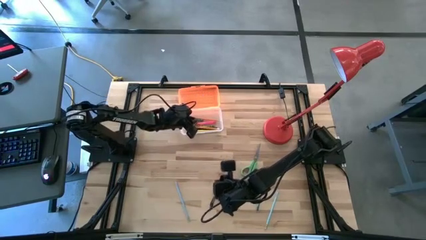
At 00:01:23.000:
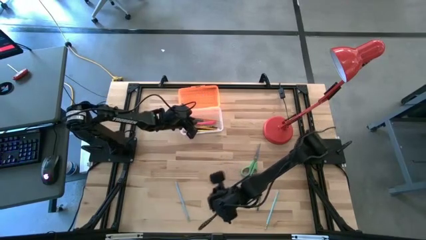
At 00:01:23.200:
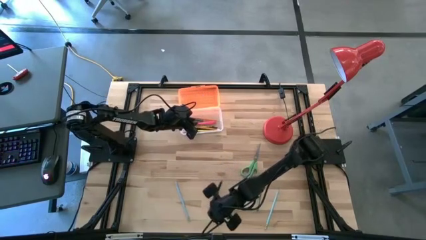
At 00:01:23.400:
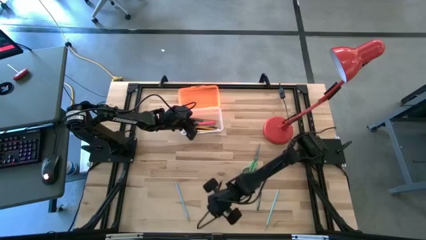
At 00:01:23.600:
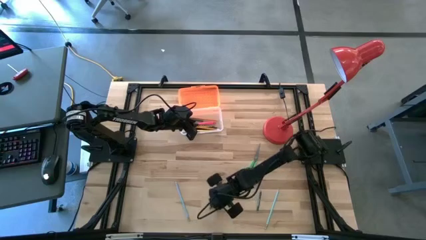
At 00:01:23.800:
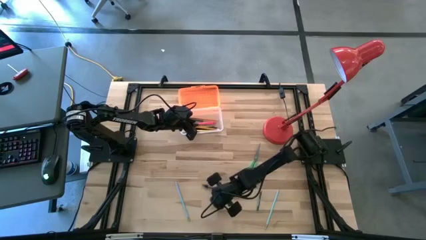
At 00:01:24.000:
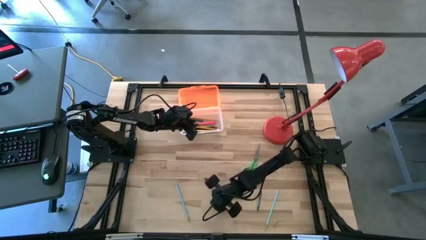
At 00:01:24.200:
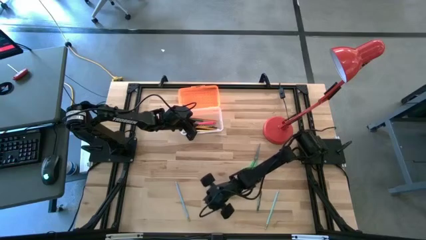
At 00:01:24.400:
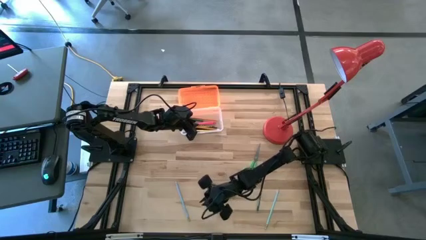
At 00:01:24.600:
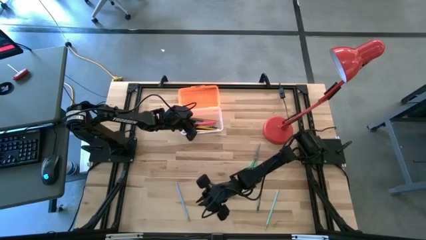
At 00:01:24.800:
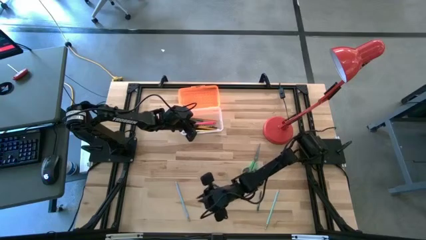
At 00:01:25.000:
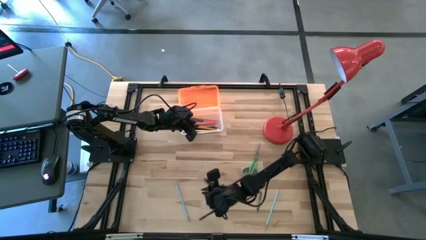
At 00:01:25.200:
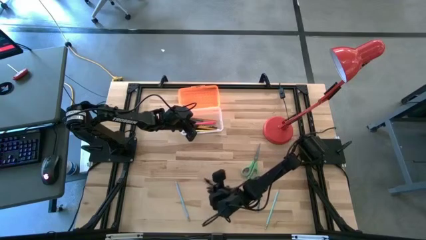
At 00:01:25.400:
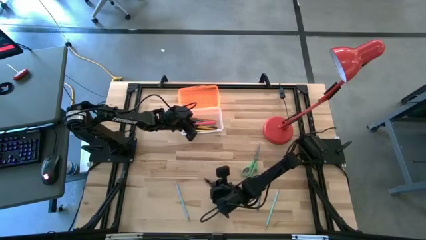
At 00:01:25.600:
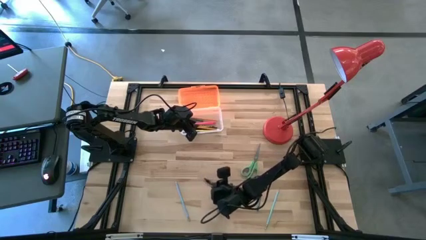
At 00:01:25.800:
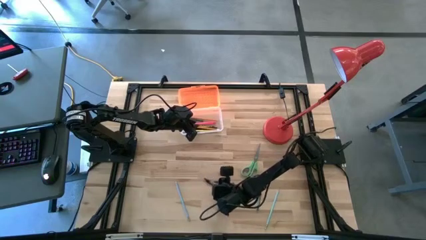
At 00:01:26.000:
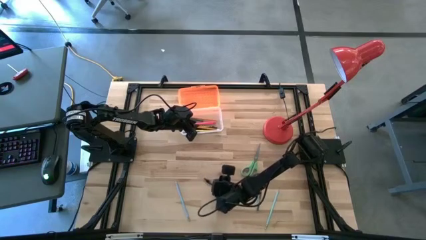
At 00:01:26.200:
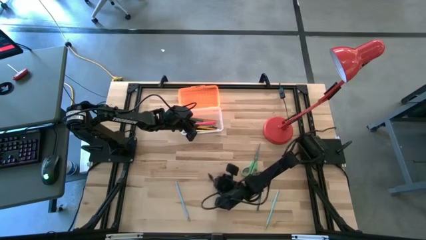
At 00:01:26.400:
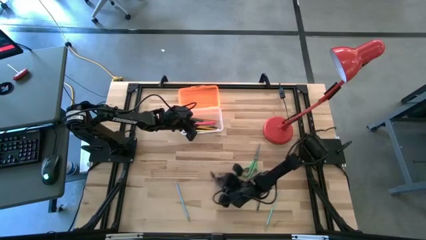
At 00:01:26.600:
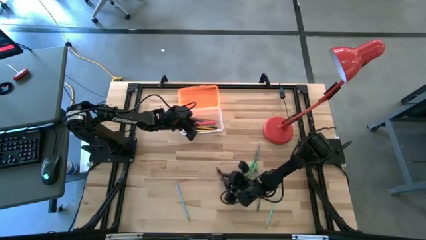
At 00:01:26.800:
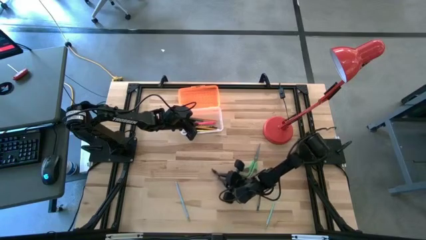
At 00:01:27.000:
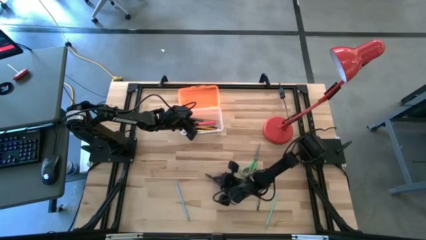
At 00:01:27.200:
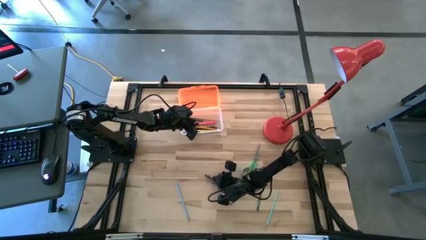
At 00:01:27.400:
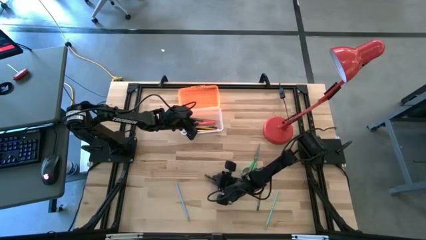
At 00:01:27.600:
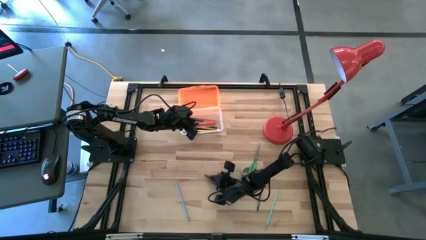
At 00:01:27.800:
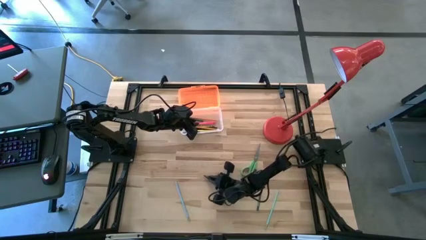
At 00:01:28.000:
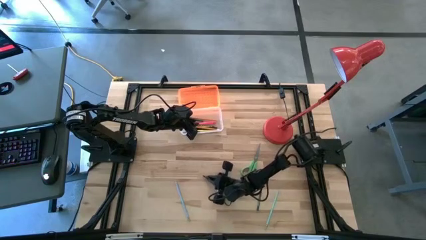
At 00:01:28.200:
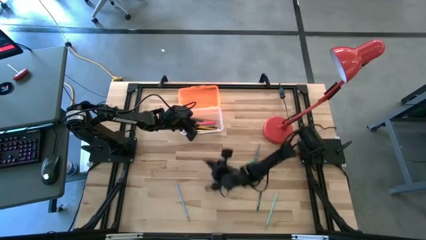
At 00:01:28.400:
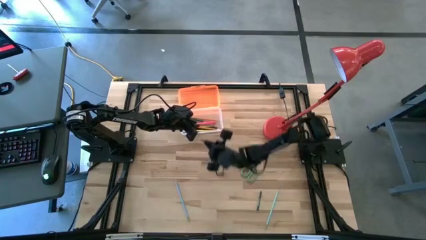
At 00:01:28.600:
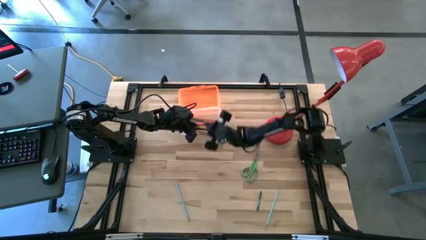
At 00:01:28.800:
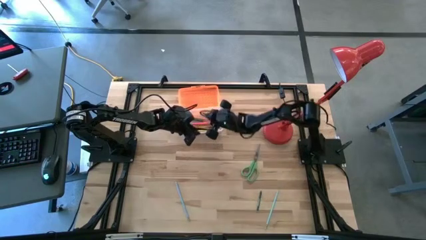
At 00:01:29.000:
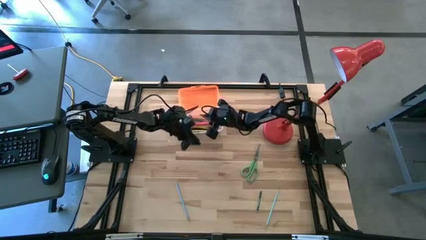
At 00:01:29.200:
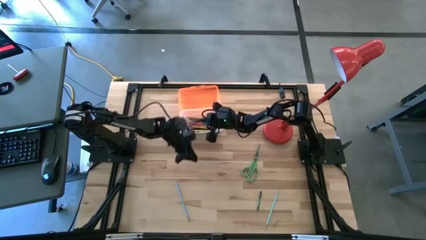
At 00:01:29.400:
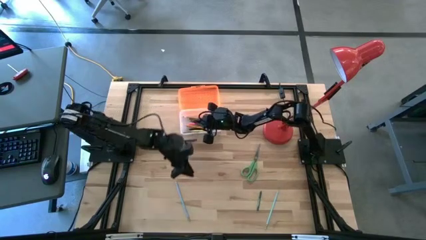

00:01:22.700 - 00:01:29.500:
Task: Pick & place school supplies into a supply box
Put the black pen into the orange supply box

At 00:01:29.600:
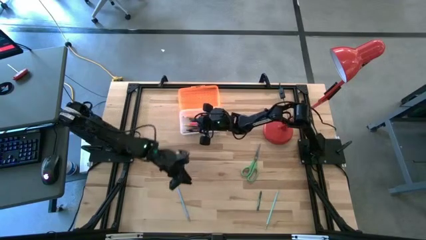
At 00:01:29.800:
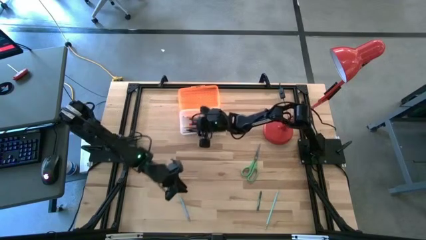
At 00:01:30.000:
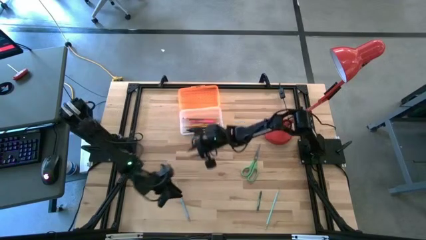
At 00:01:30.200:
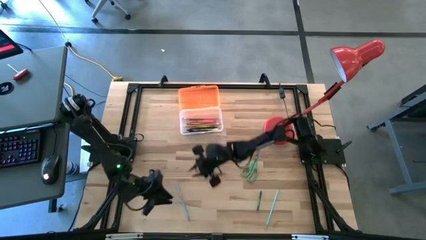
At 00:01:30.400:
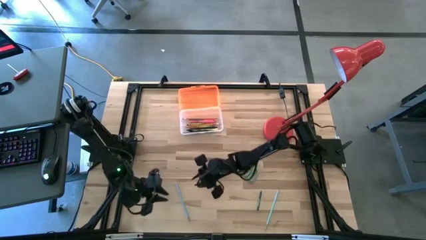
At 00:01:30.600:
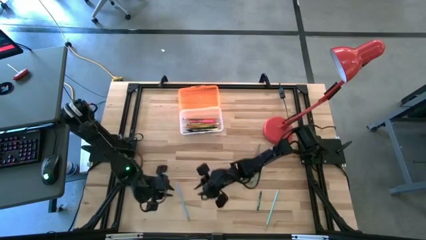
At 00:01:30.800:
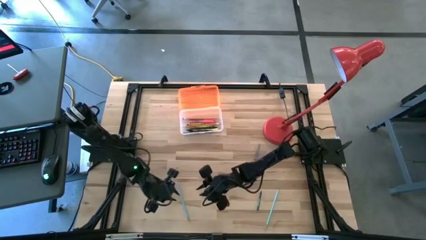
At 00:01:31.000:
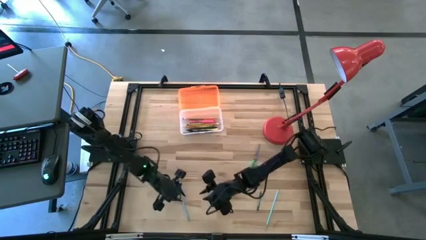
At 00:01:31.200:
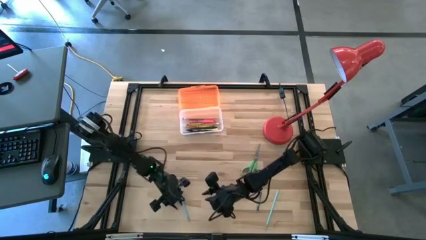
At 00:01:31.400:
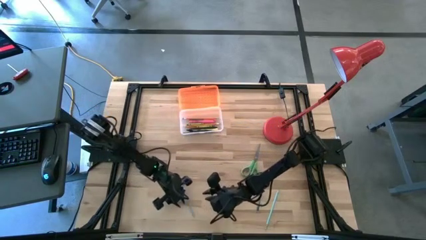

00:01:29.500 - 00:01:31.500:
Put the left blue pencil into the orange supply box

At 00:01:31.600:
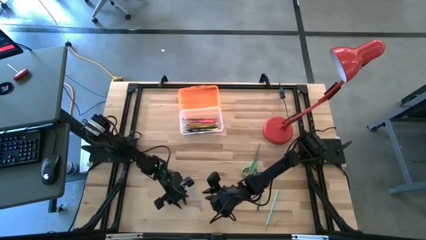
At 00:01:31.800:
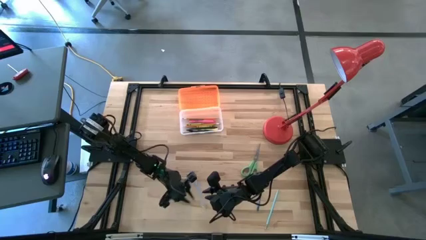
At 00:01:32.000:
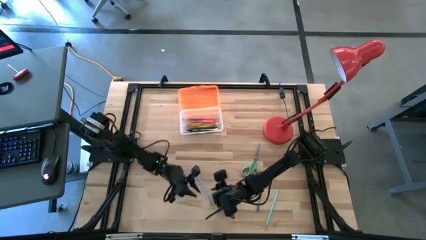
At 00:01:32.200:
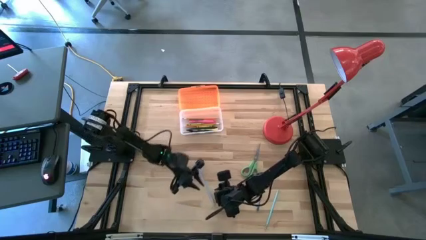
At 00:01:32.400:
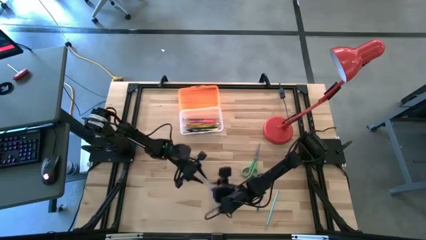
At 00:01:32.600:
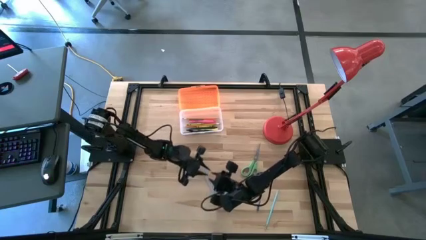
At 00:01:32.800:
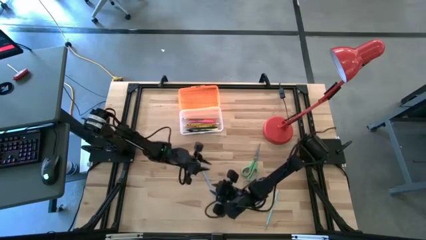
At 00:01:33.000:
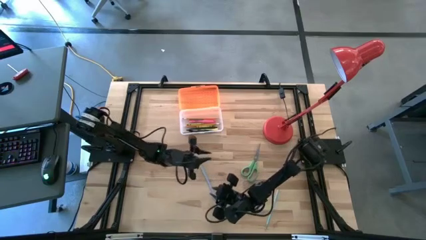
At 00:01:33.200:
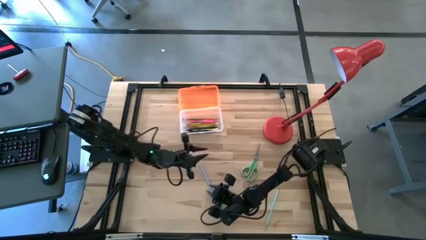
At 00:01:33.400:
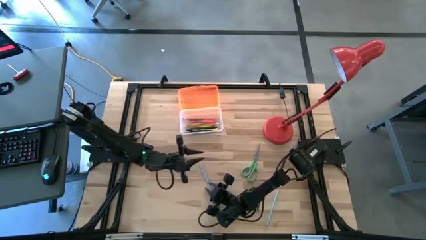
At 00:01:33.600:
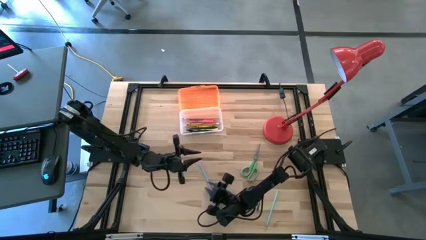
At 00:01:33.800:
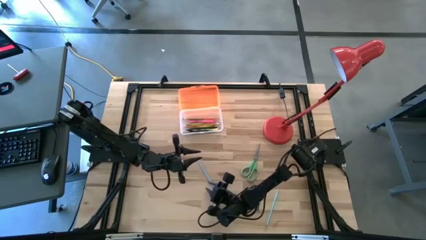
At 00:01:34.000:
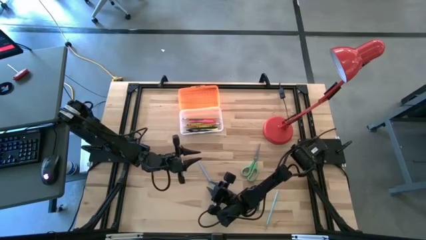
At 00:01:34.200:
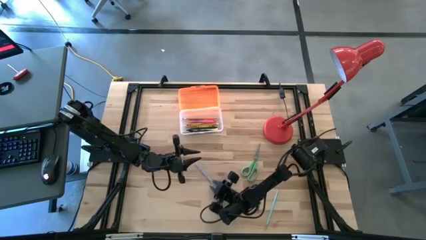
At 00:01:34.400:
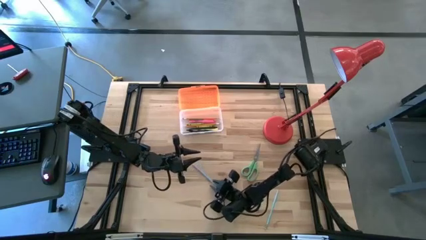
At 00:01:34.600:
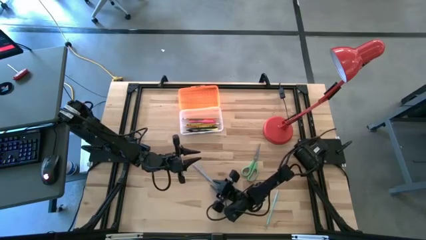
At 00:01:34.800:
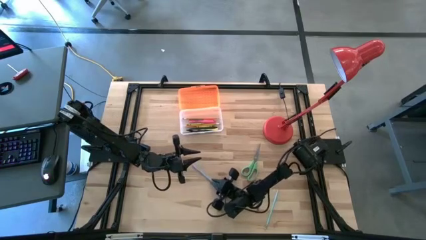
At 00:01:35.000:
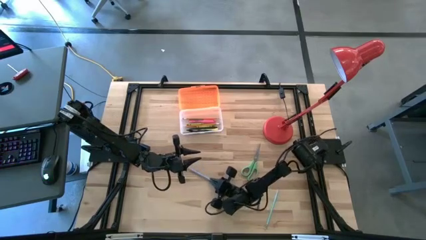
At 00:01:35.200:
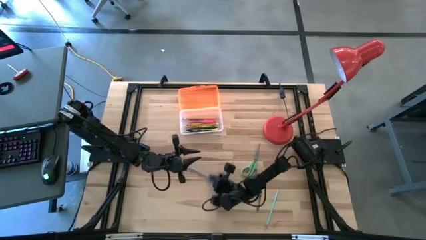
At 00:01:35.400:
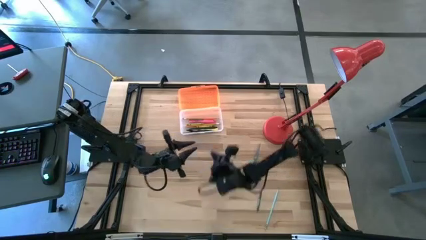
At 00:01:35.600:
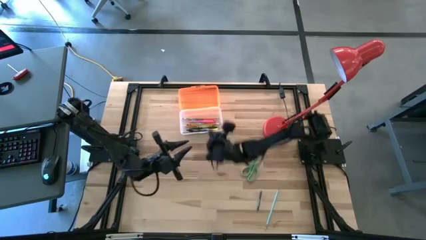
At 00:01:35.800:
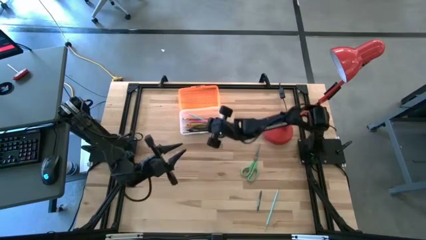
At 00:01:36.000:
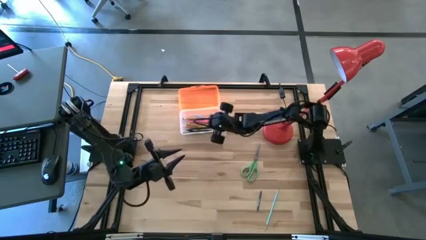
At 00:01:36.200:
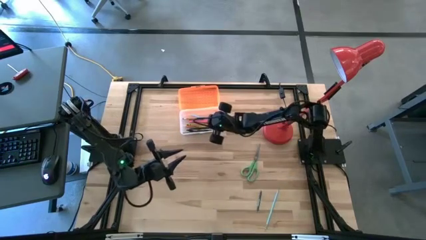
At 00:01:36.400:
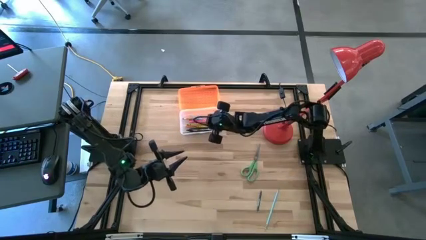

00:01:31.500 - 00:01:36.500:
Put the left blue pencil into the orange supply box
